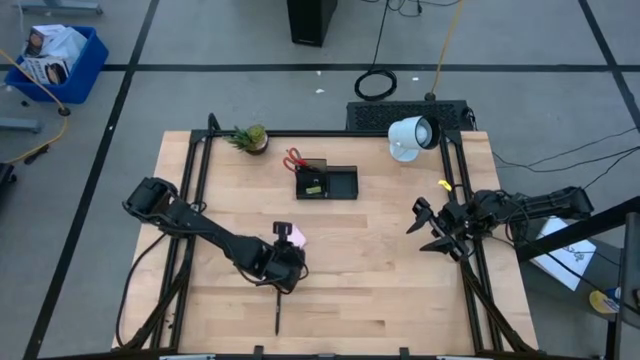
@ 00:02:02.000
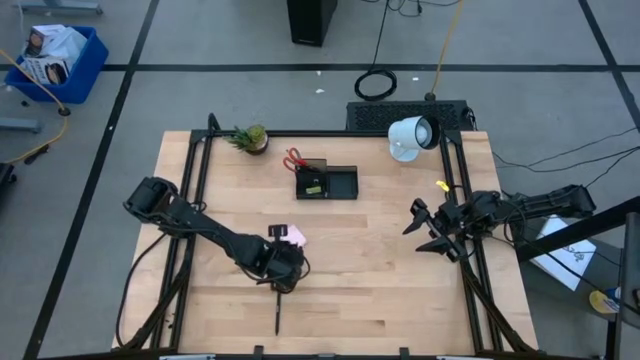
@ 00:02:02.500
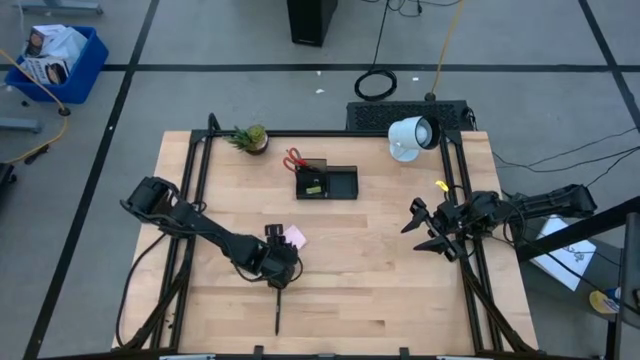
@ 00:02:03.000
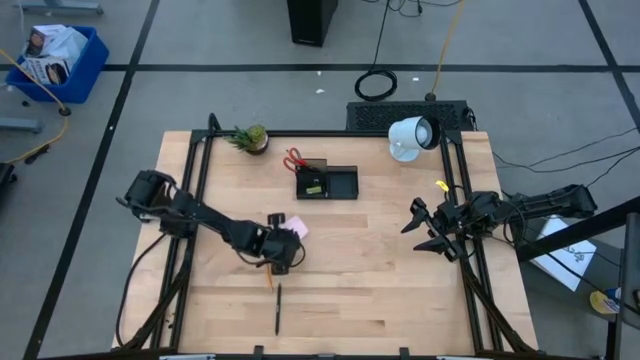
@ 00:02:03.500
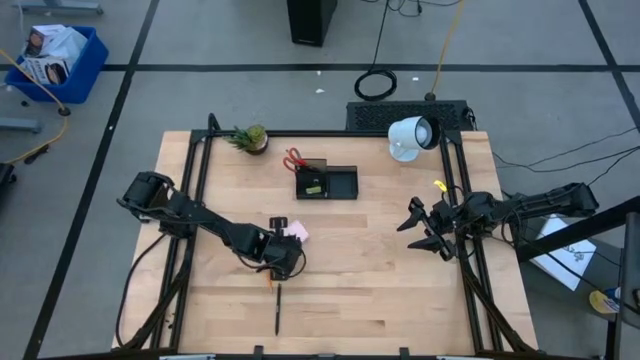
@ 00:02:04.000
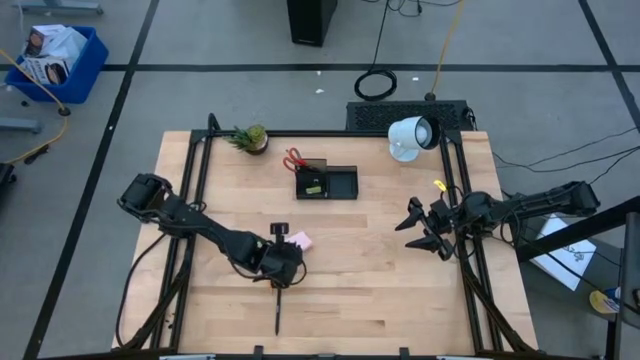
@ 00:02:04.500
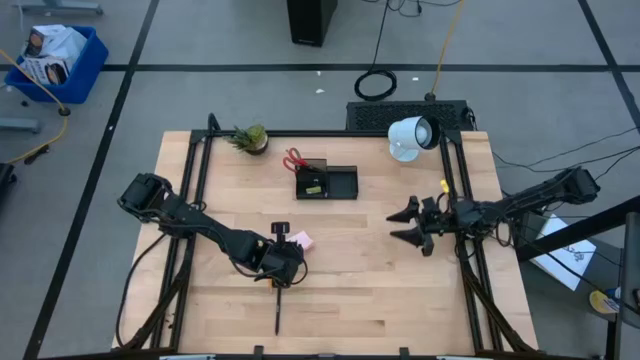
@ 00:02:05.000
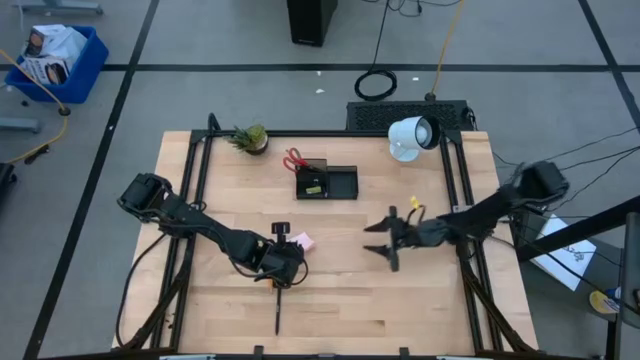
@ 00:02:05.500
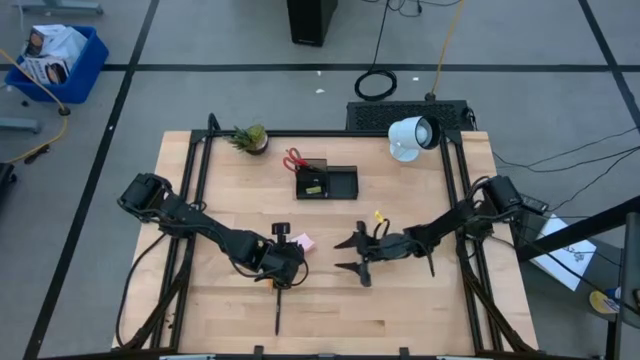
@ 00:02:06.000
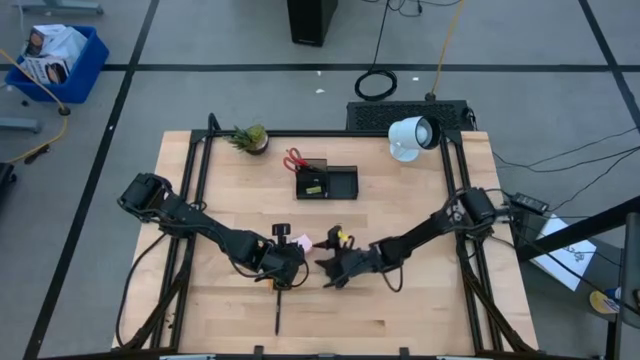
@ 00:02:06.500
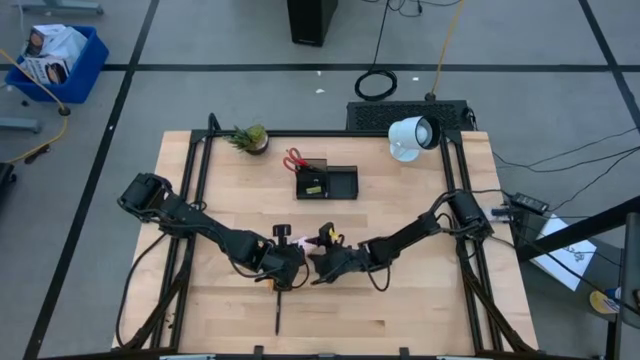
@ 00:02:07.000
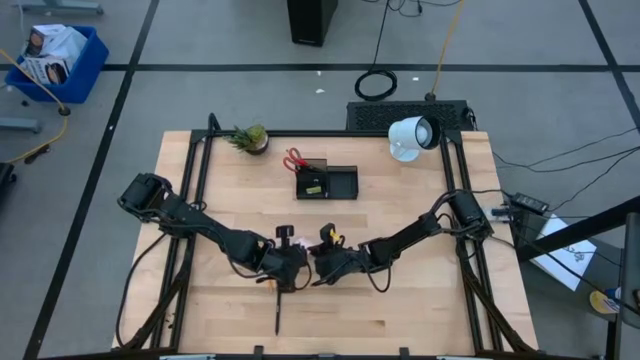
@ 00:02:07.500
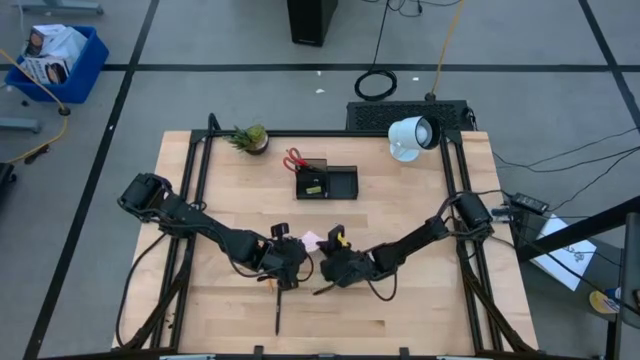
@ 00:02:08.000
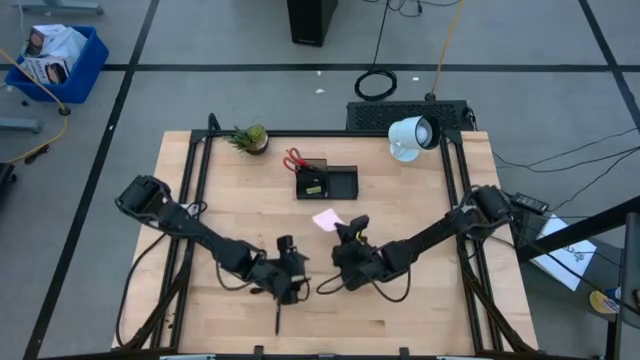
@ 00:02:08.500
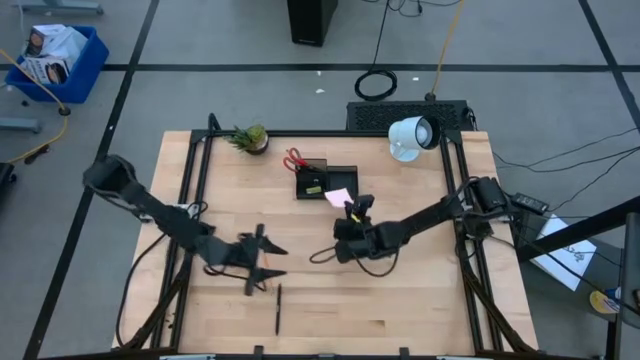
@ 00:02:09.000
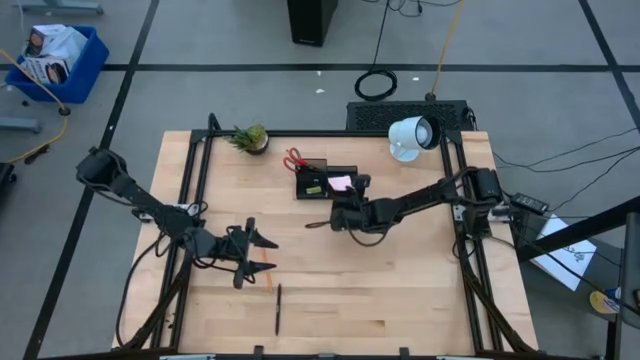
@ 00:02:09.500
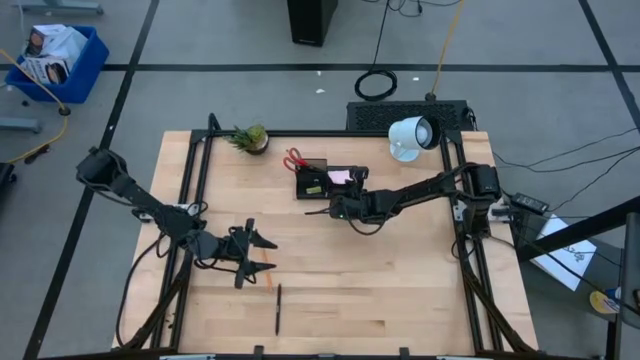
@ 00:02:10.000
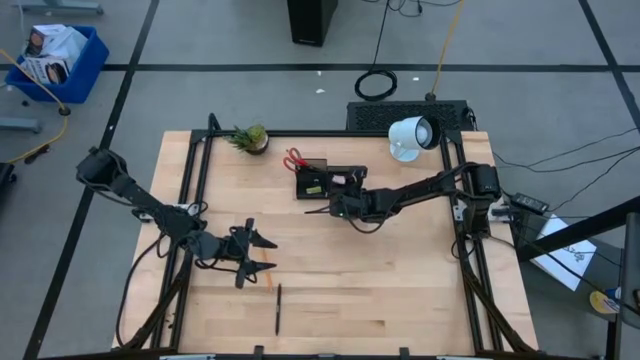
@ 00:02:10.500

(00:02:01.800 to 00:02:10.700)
Task: Pick and place office supplies into organizer
Put the sticky note into the mesh organizer

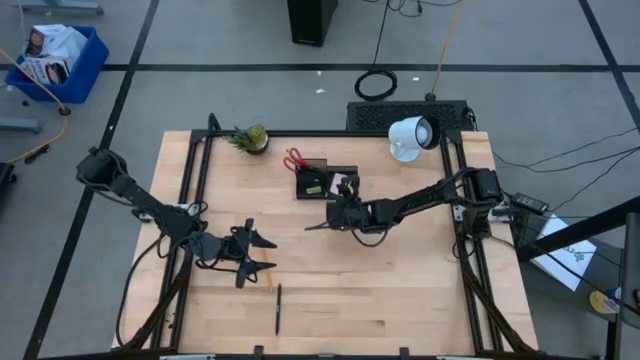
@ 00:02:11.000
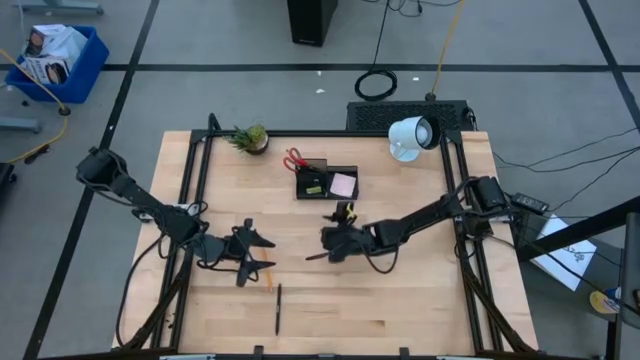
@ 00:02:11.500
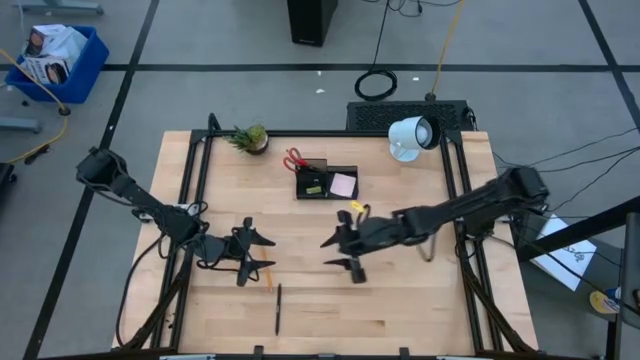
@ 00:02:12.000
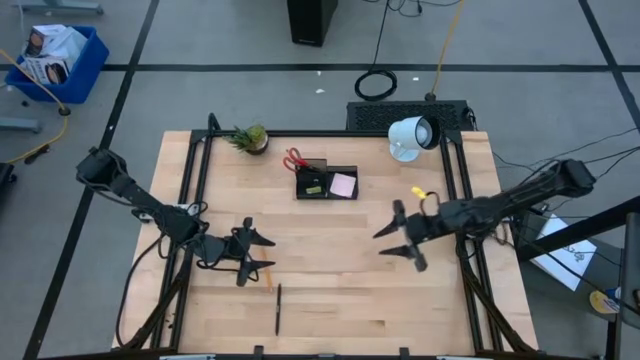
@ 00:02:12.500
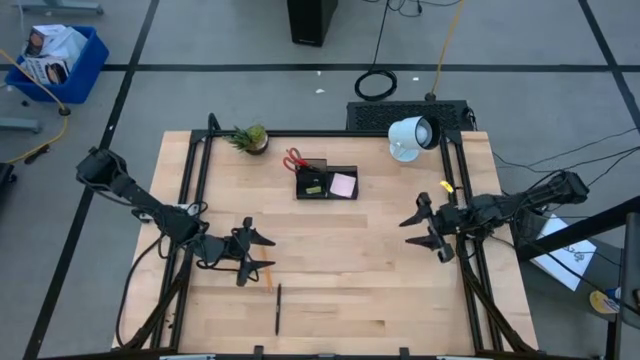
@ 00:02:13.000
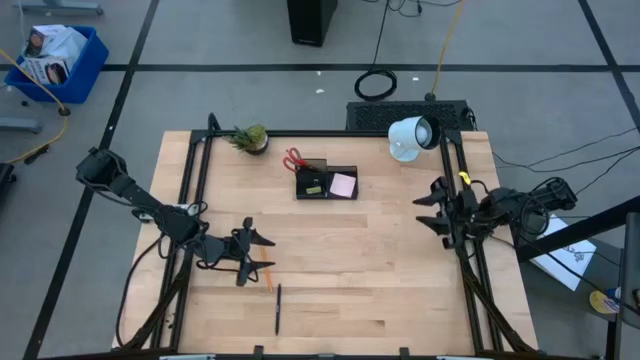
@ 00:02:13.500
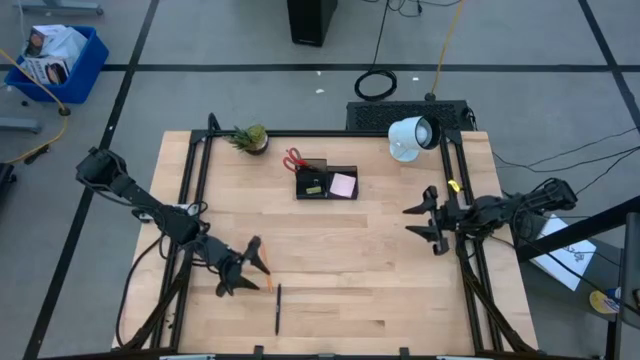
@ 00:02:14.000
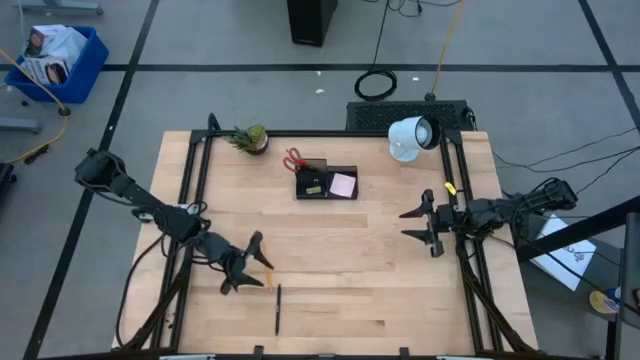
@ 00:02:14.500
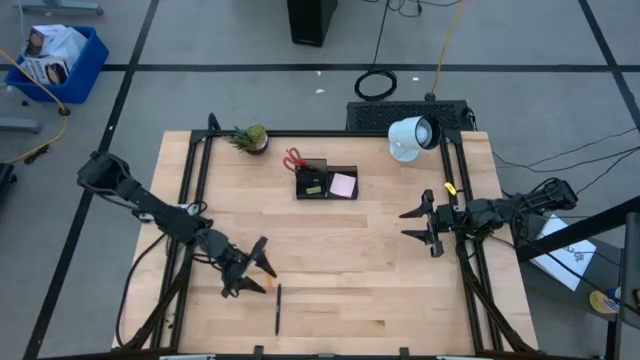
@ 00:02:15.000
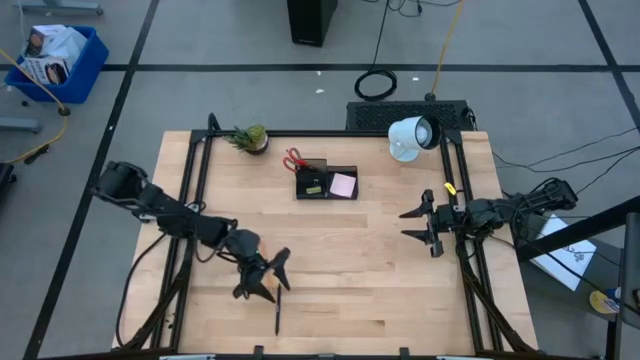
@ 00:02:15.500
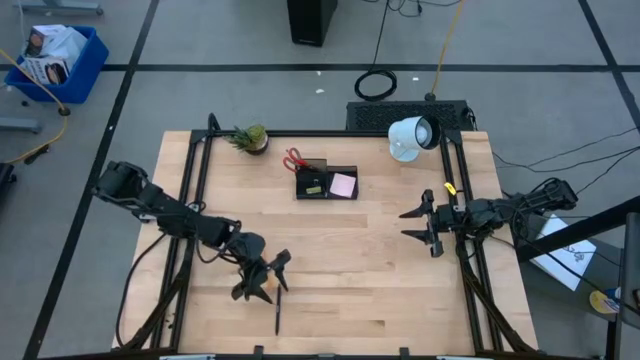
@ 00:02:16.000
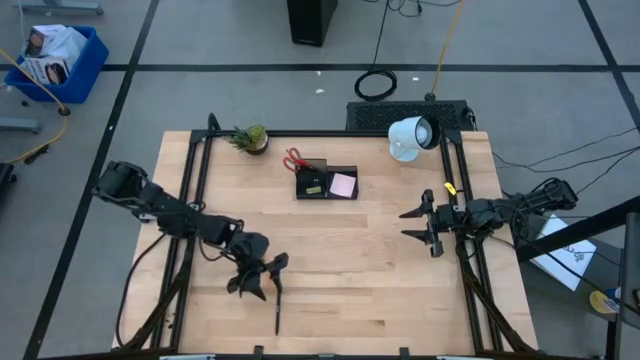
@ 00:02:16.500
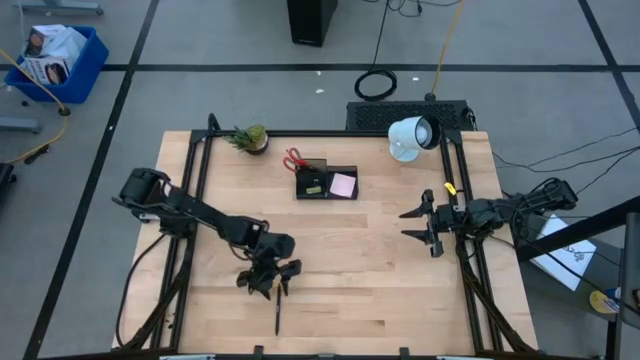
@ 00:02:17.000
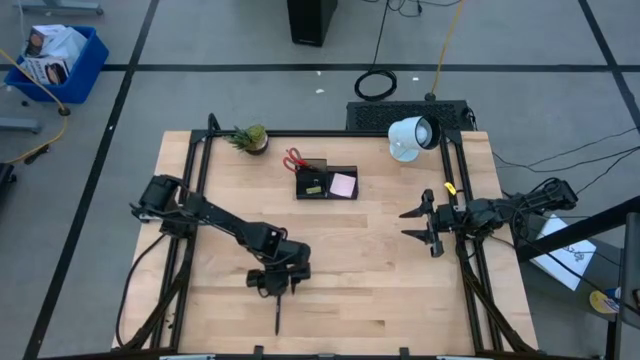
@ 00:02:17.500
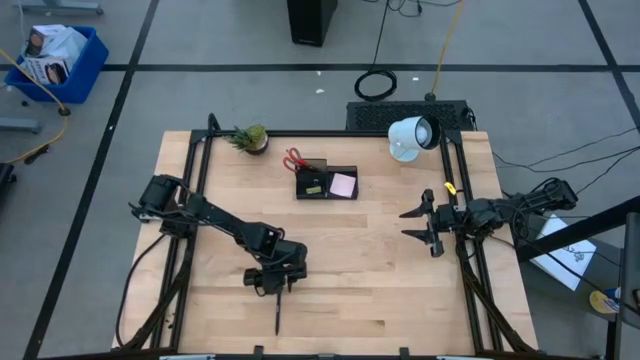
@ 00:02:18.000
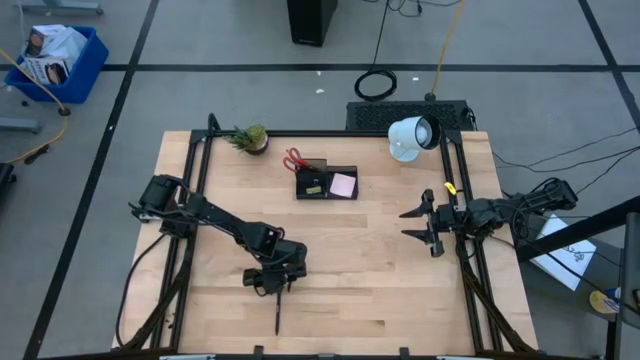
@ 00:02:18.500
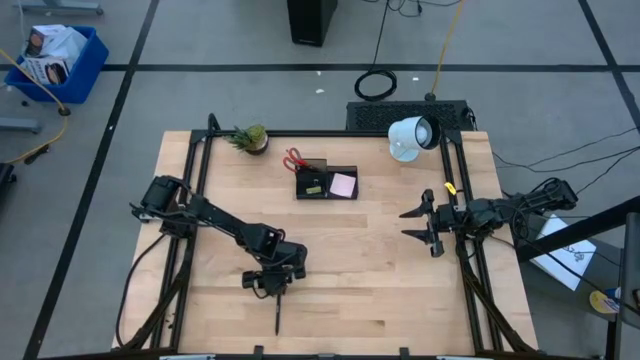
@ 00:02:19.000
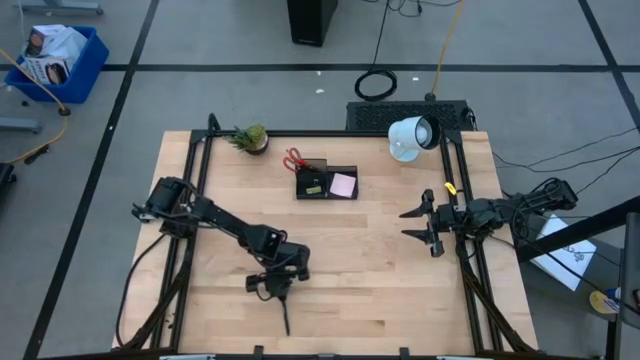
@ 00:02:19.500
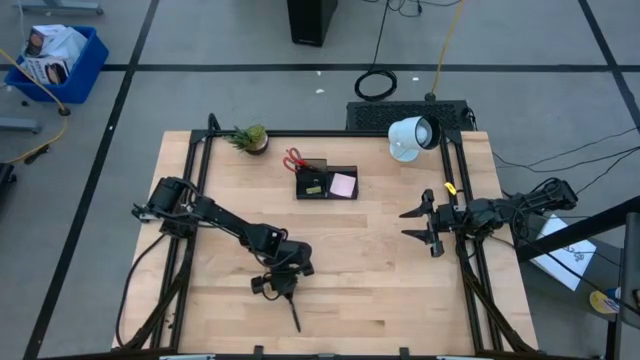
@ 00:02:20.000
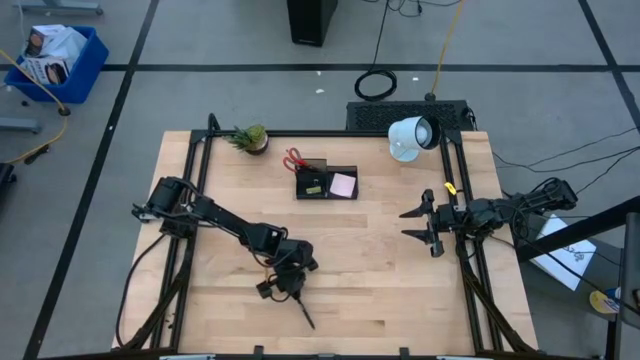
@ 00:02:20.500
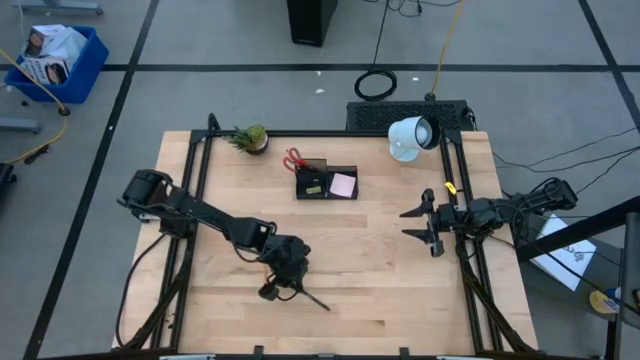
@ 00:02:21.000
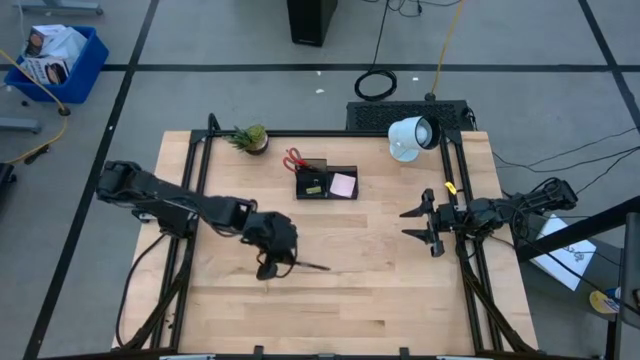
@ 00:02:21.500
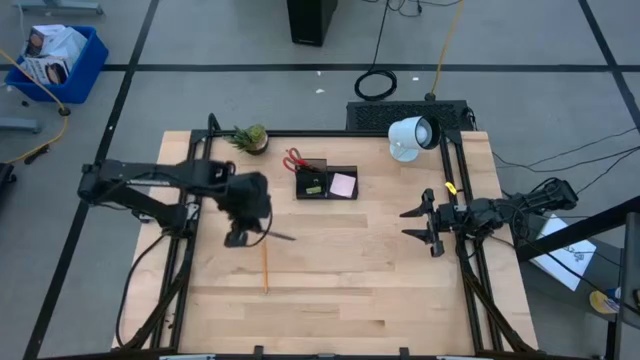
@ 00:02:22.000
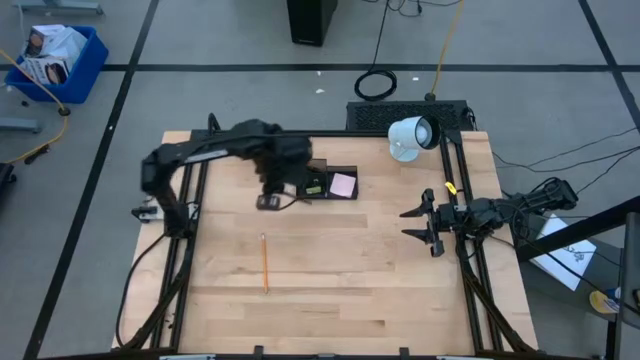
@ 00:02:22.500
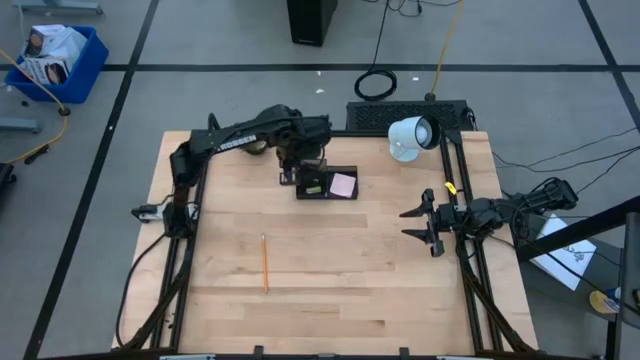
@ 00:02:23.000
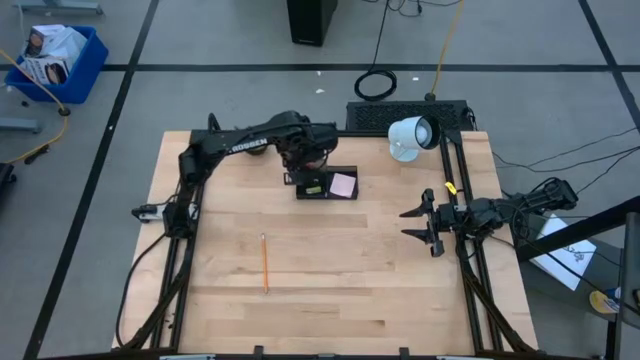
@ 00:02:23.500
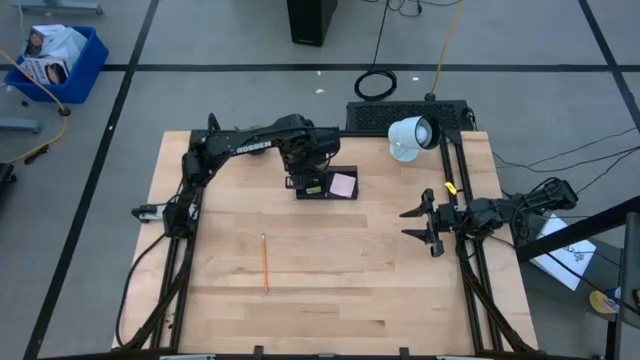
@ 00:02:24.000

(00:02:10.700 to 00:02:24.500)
Put the pen into the mesh organizer
